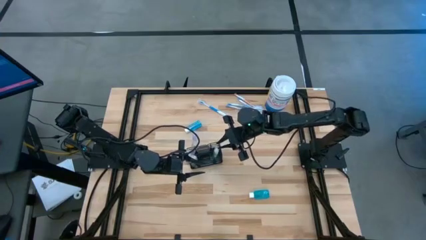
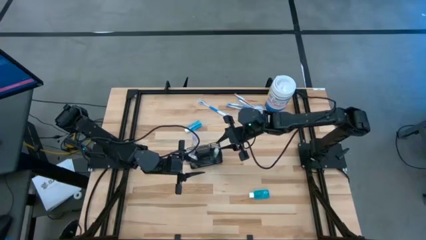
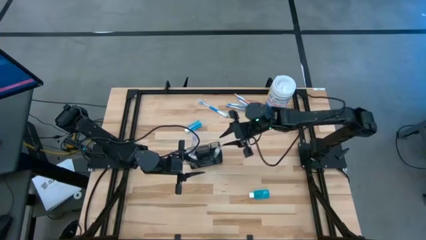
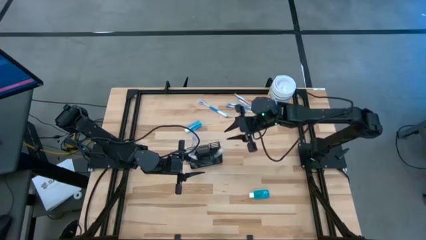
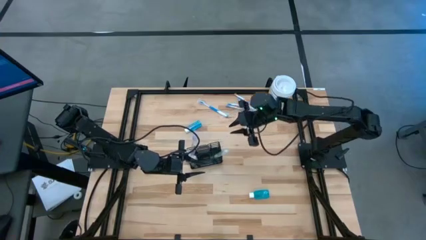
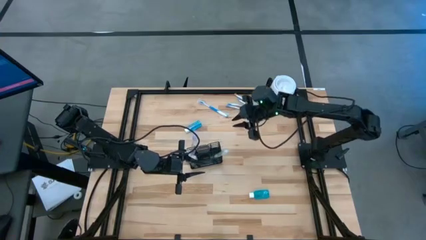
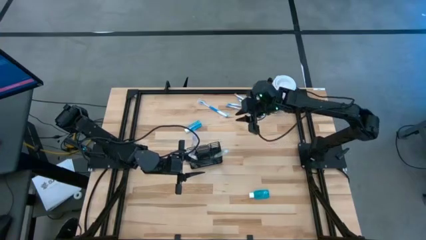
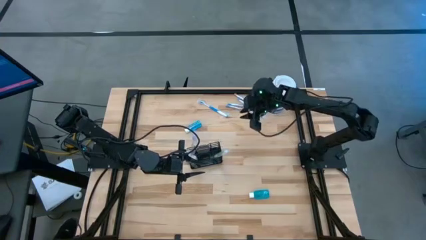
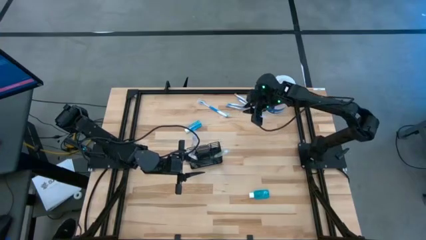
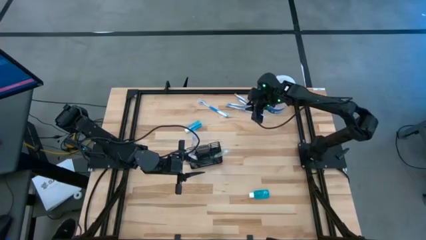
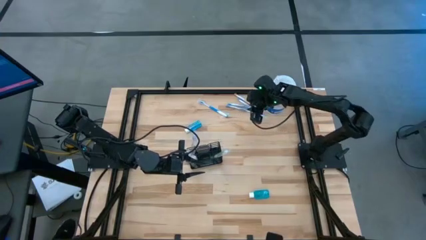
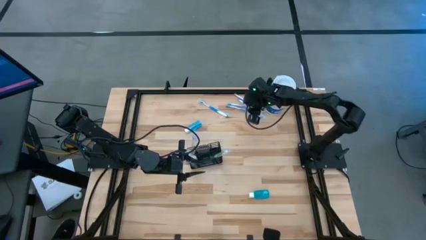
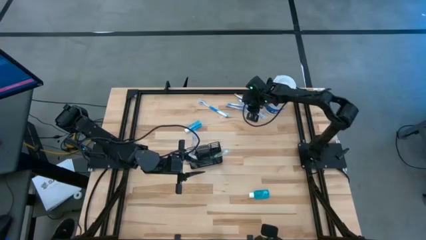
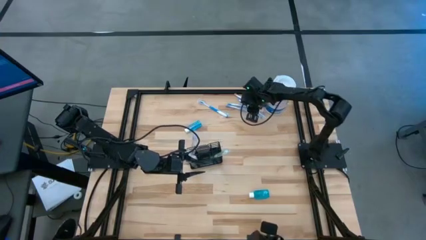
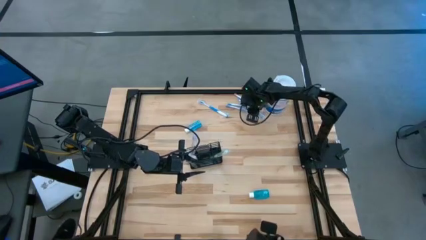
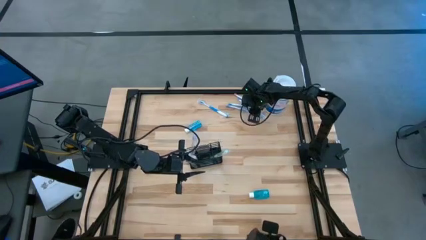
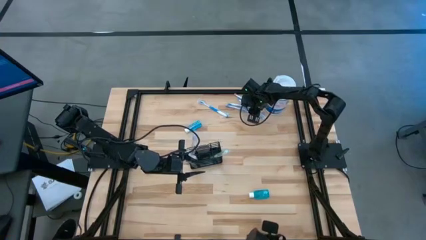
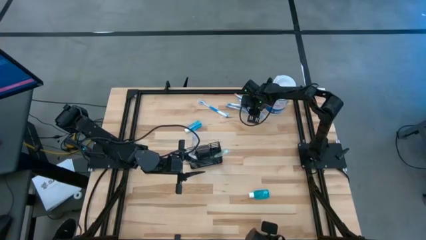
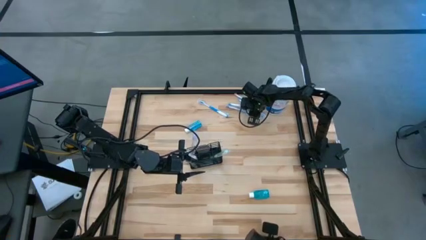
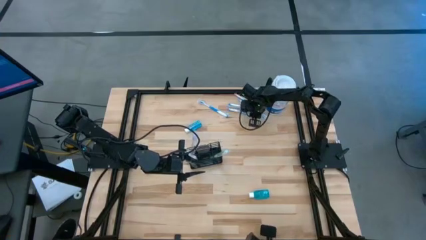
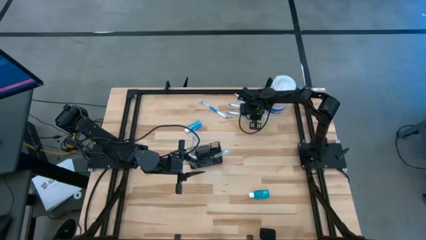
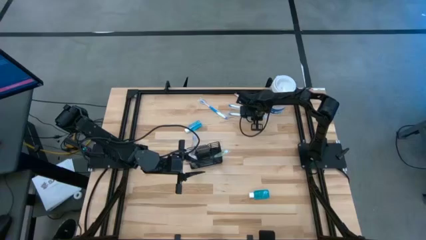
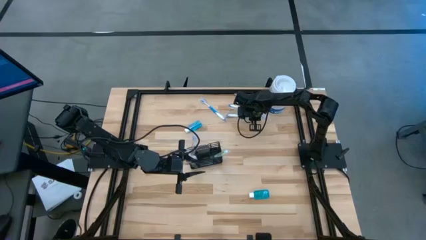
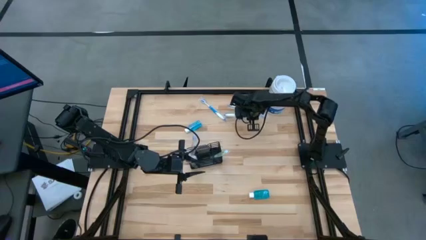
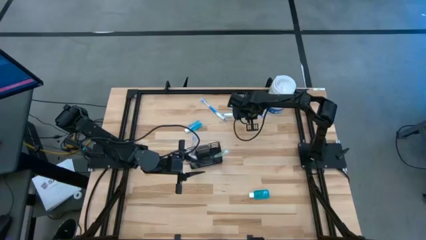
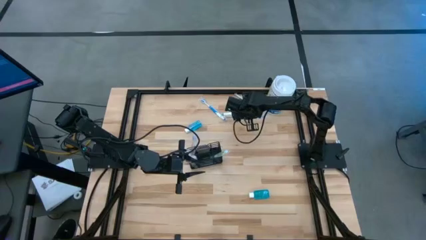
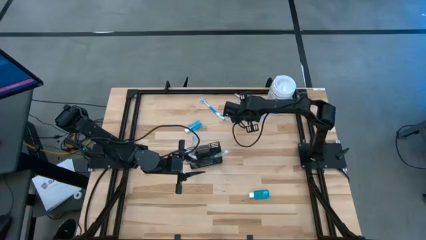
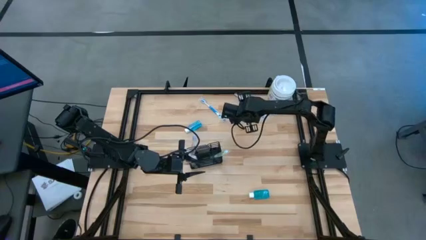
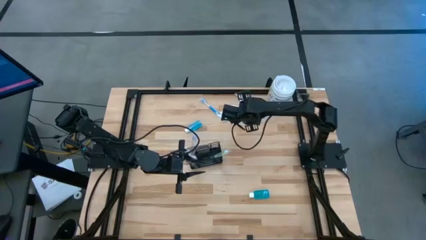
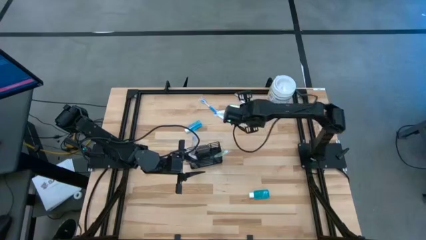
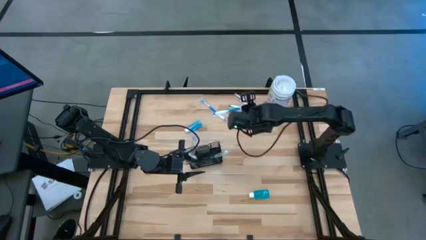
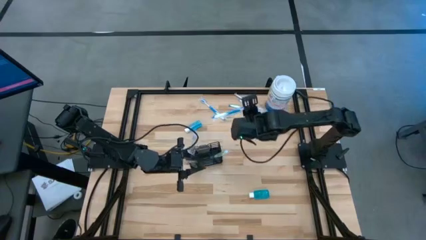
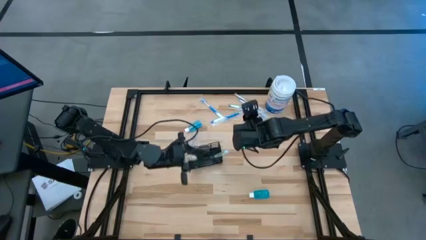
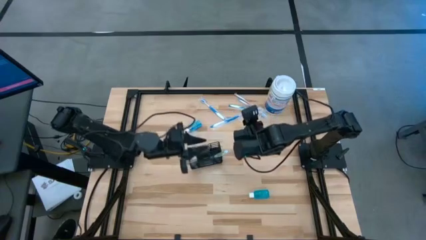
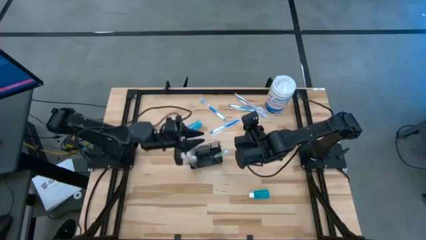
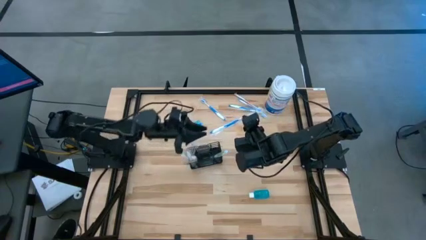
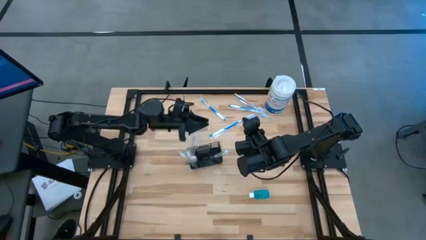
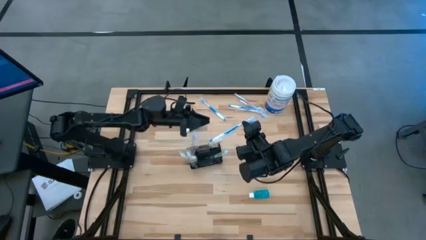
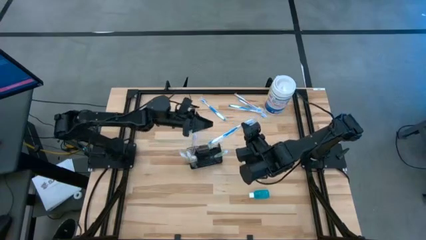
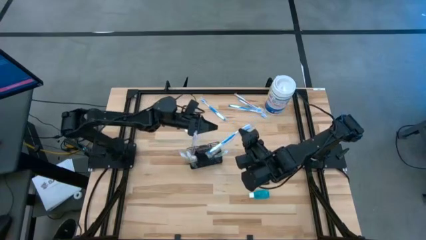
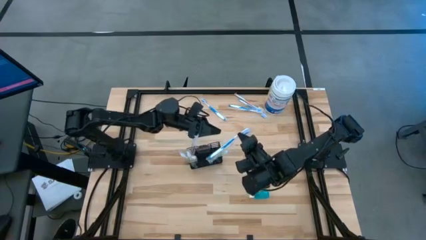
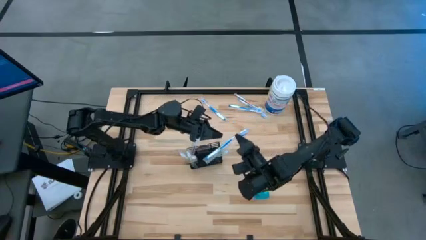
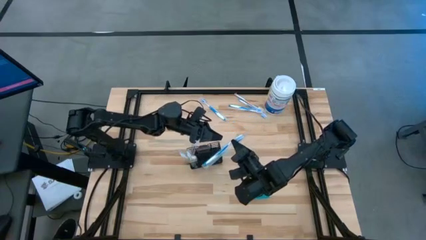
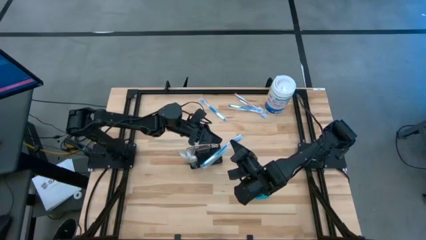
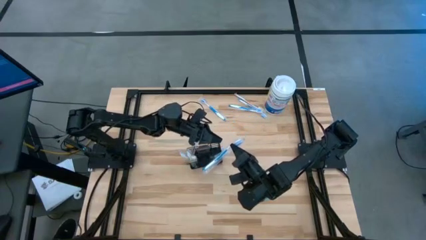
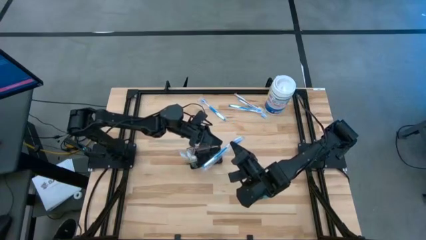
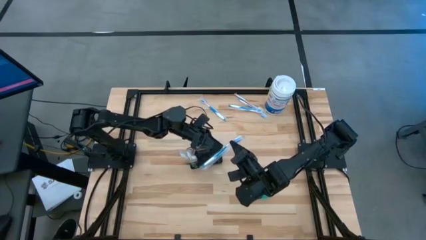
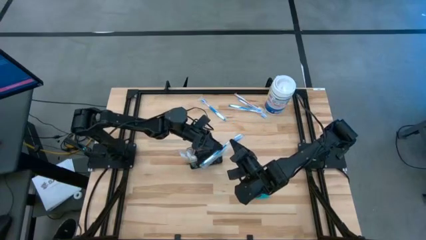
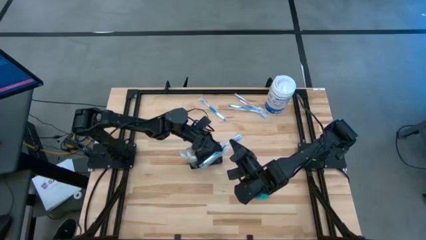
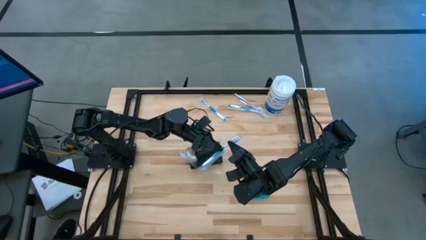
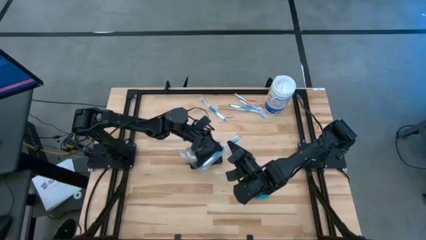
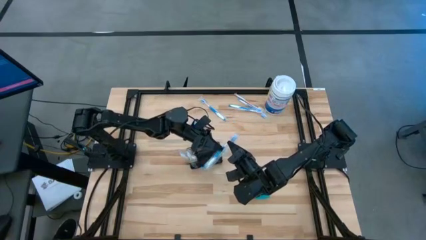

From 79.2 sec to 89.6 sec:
Task: Pick & Place toothbrushing station
Put the blue toothbrush into the wire organizer

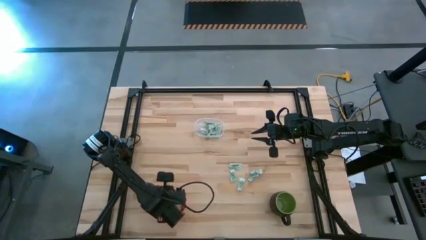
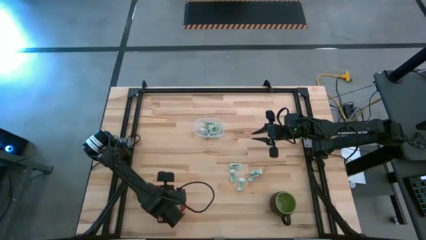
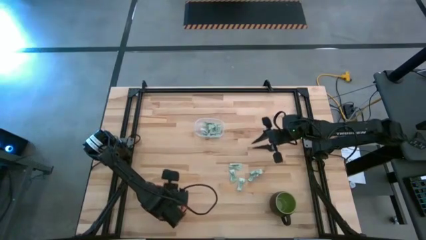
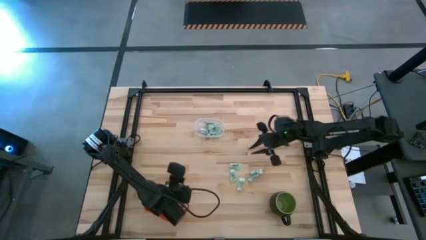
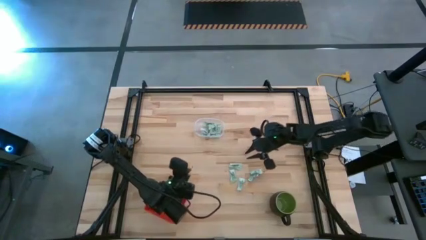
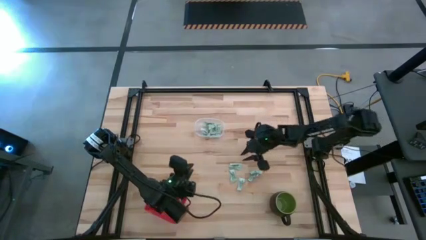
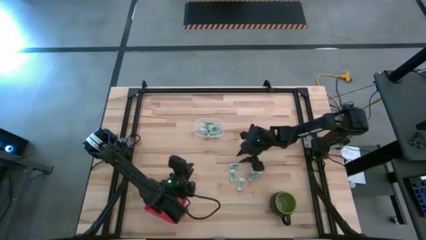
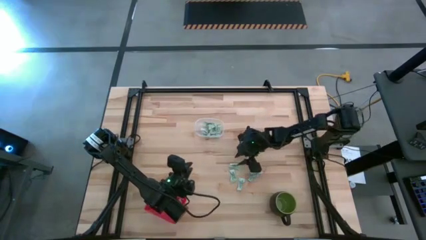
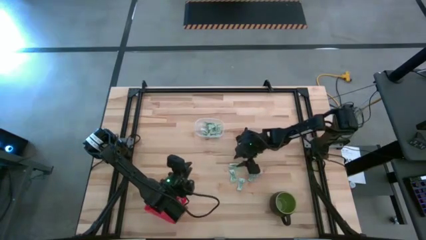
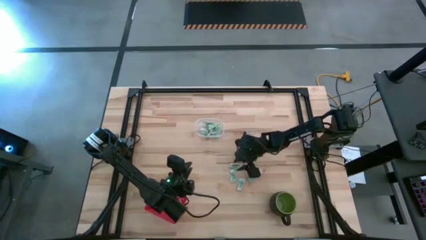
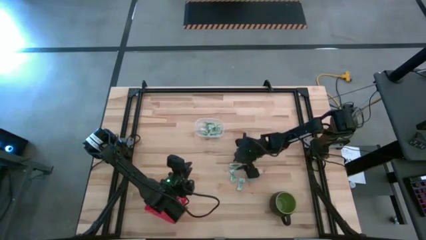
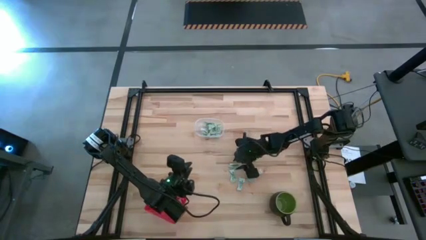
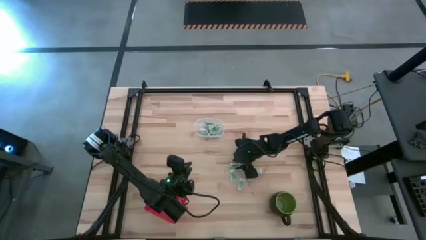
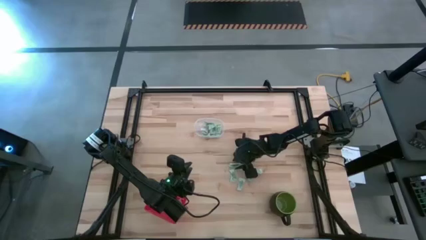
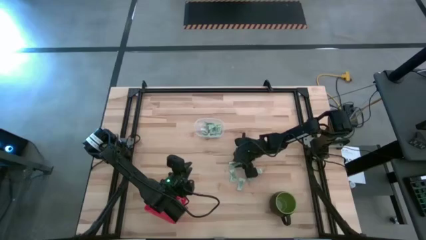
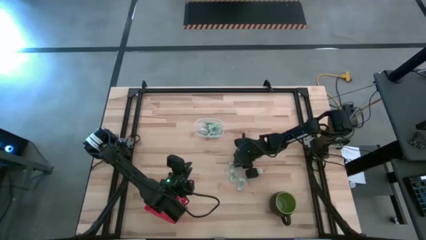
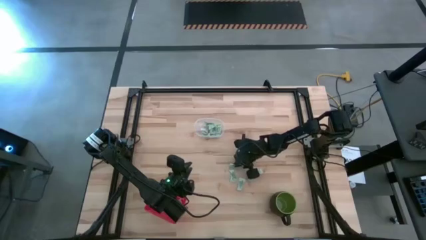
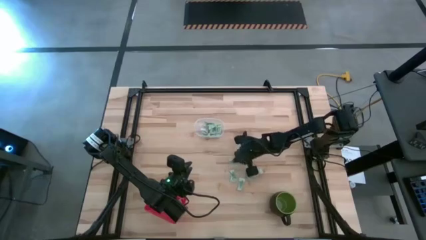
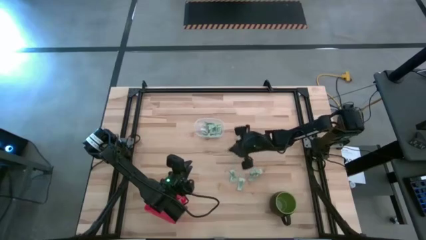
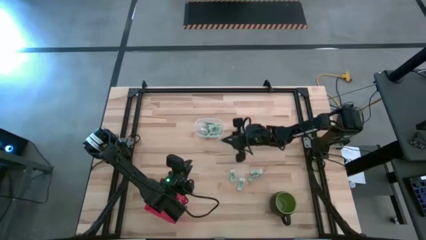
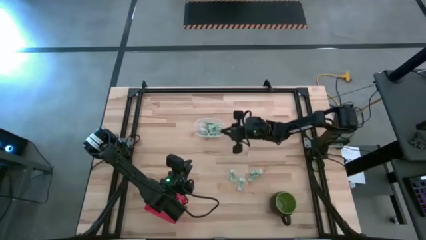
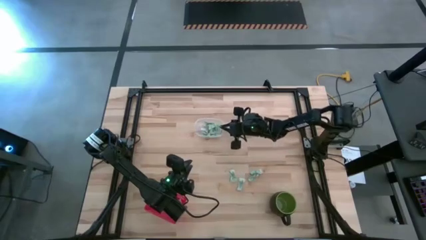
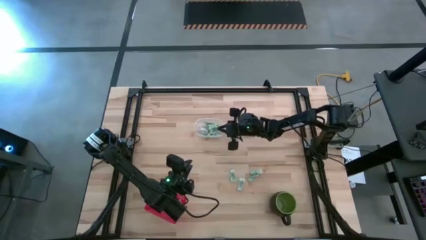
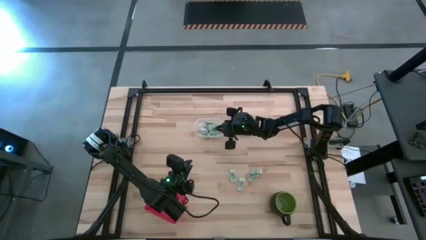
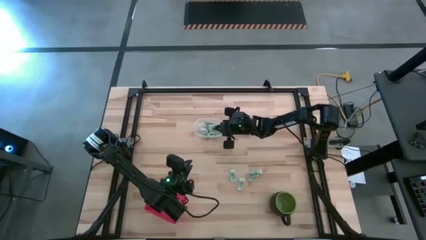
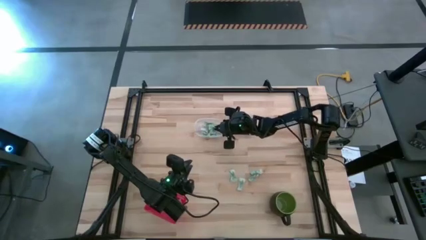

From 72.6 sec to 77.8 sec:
Task: Pick and place items into bin
Put the stevia packet into the transparent bin
